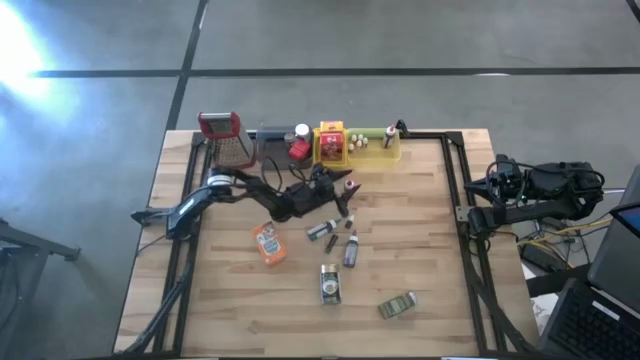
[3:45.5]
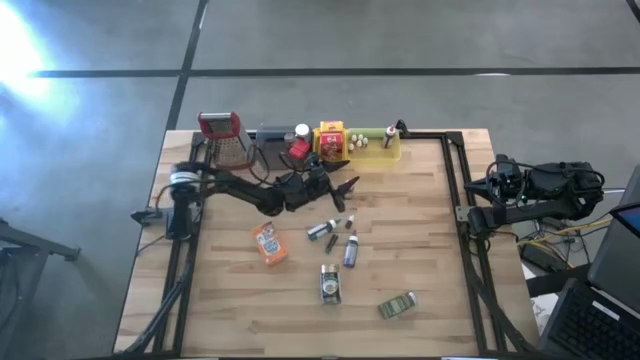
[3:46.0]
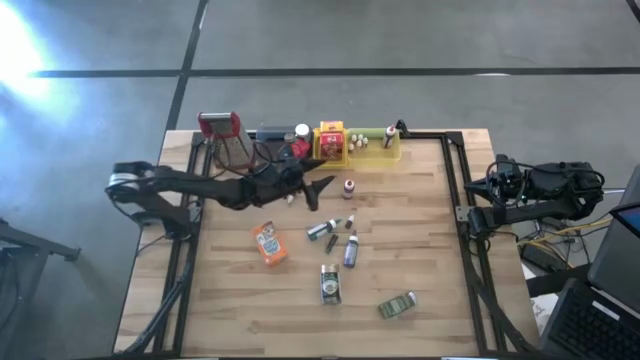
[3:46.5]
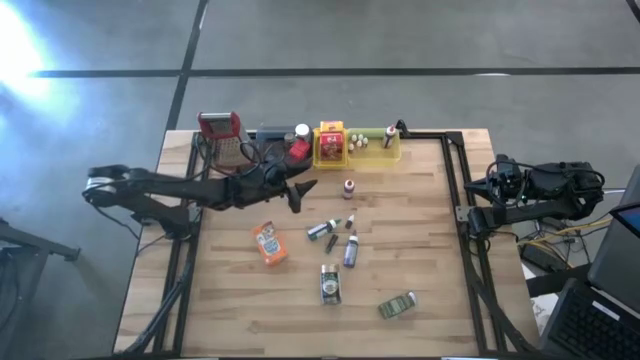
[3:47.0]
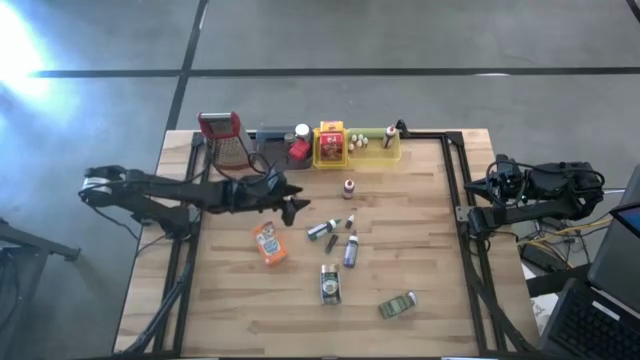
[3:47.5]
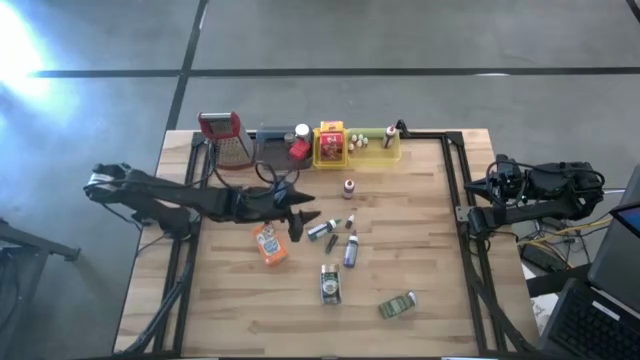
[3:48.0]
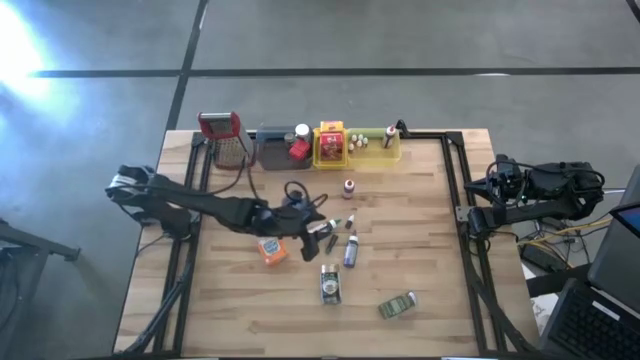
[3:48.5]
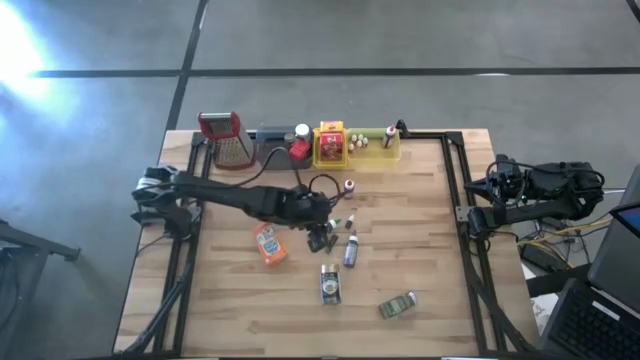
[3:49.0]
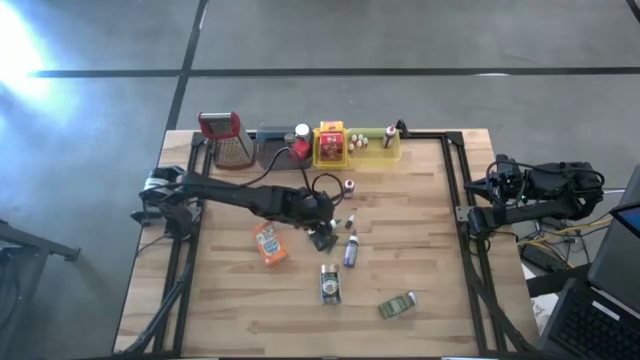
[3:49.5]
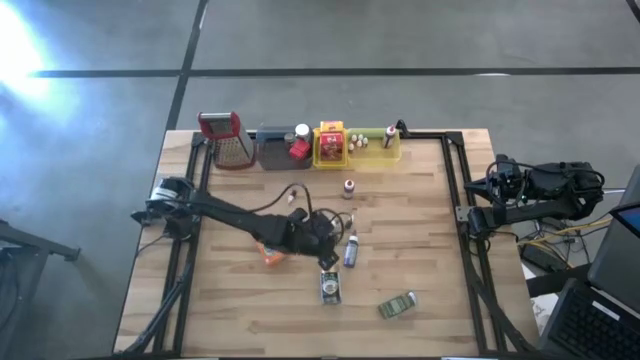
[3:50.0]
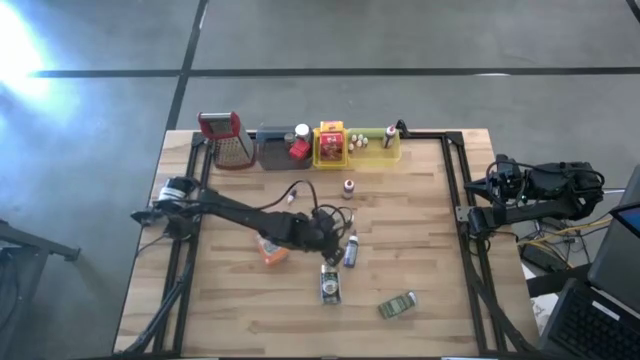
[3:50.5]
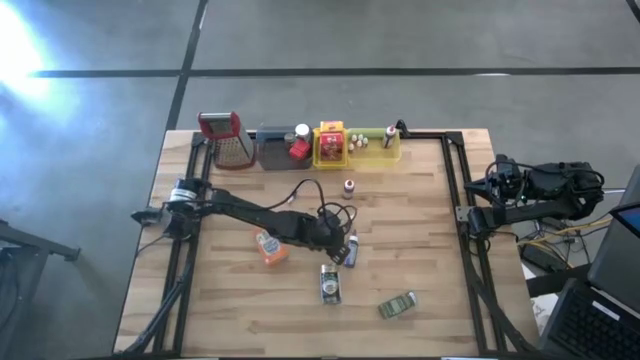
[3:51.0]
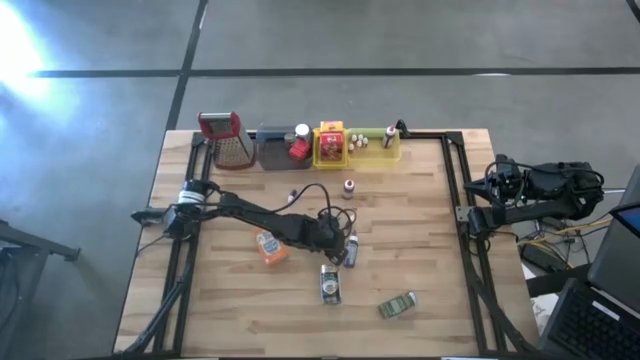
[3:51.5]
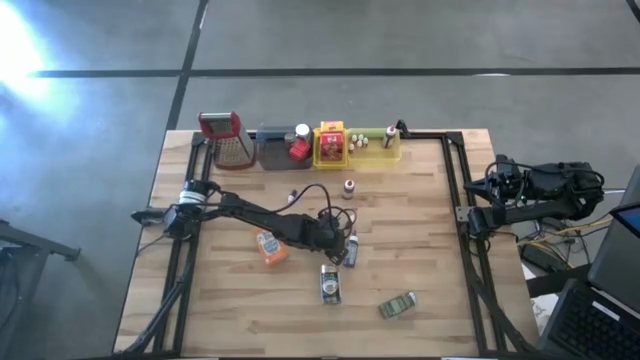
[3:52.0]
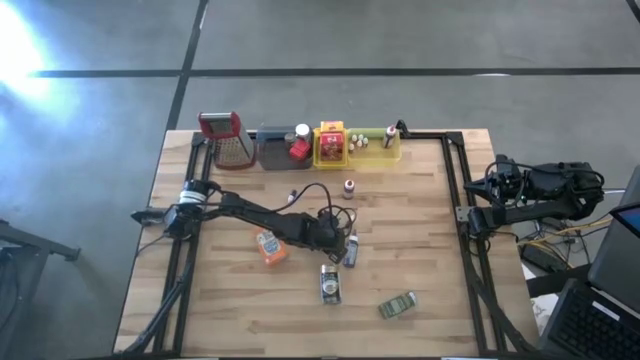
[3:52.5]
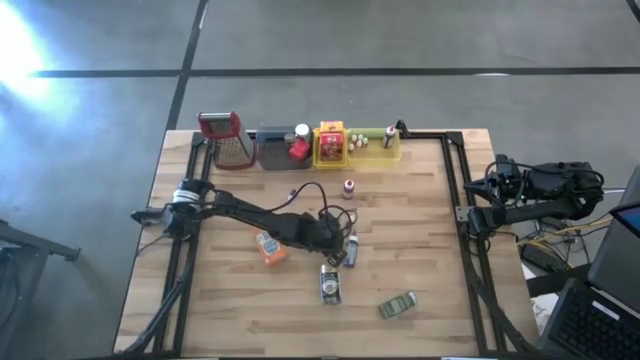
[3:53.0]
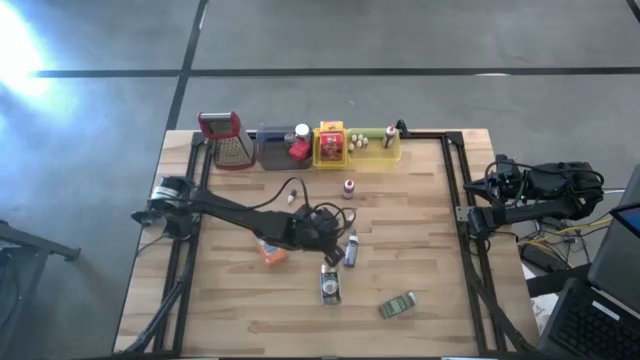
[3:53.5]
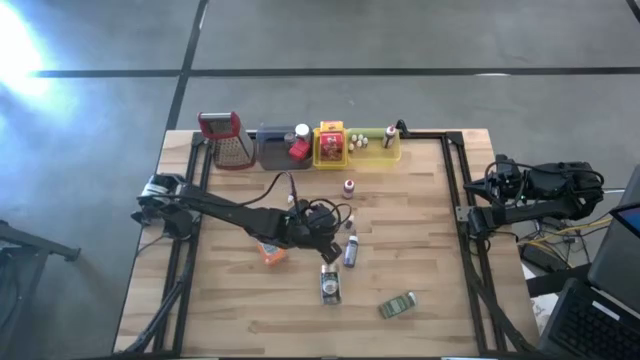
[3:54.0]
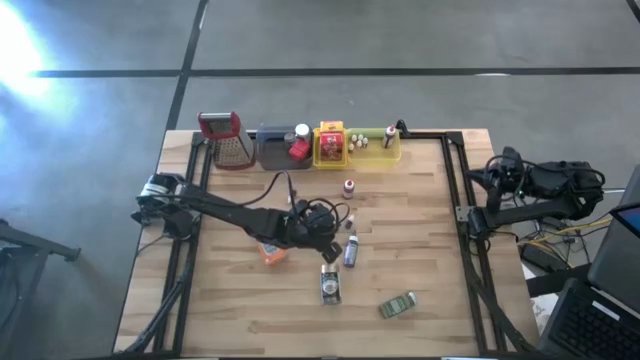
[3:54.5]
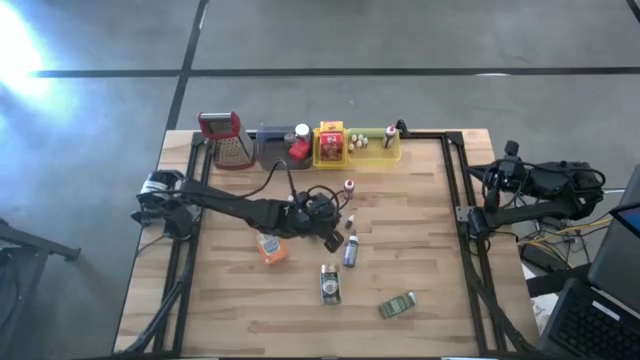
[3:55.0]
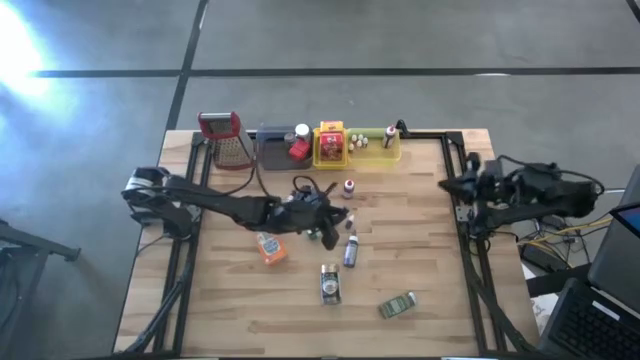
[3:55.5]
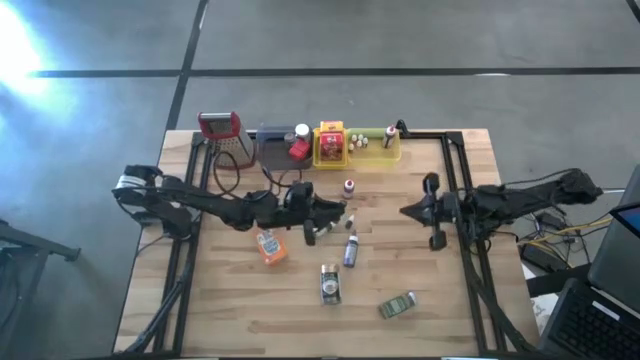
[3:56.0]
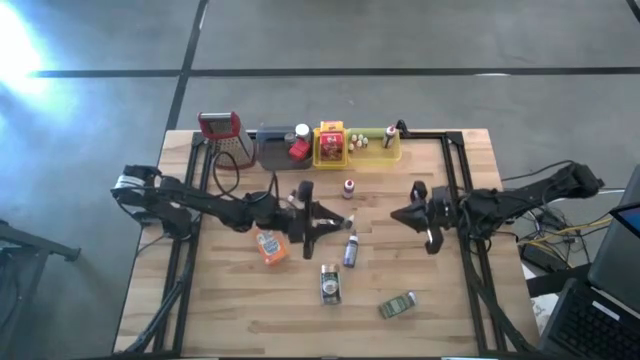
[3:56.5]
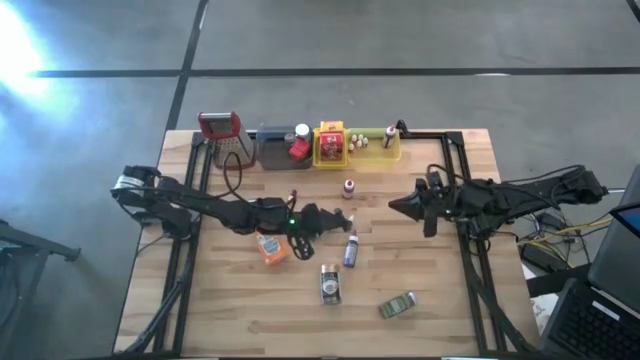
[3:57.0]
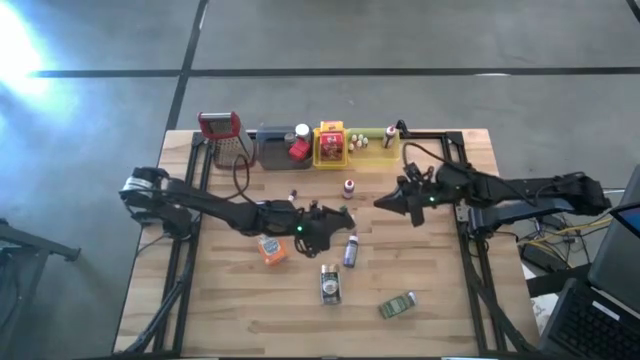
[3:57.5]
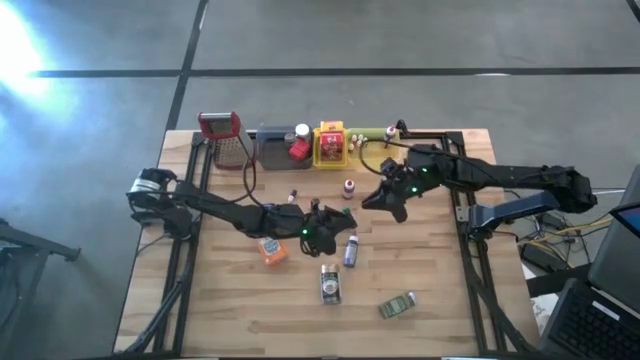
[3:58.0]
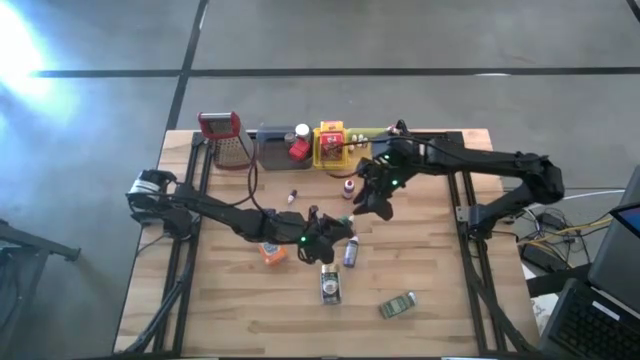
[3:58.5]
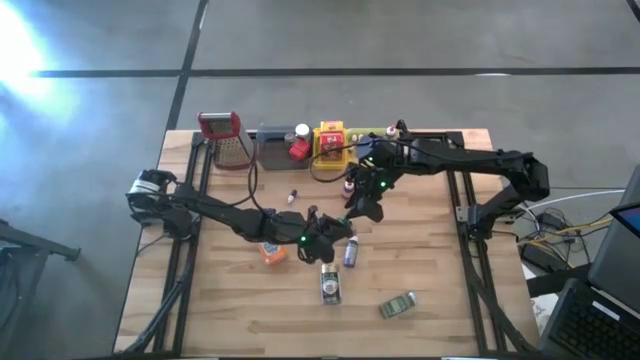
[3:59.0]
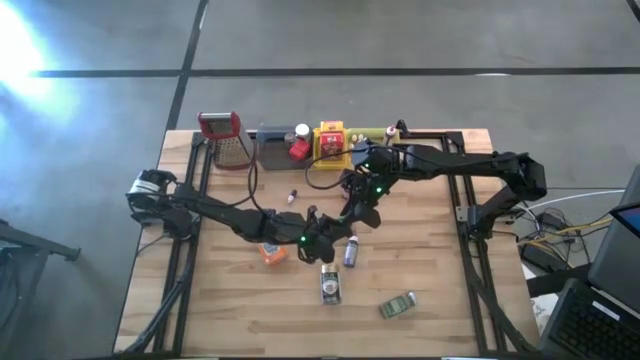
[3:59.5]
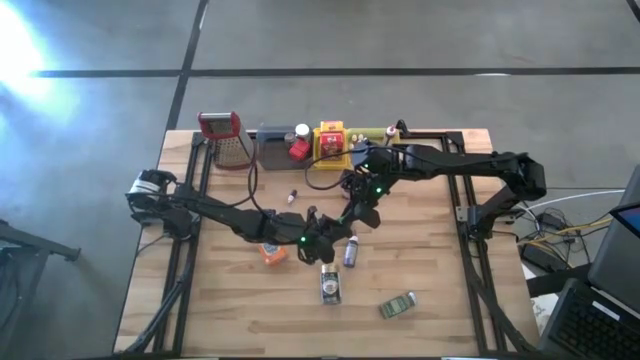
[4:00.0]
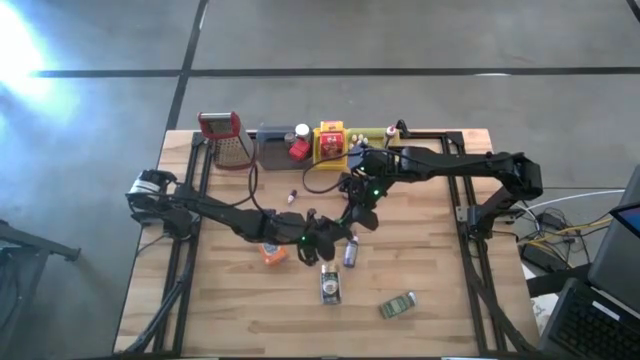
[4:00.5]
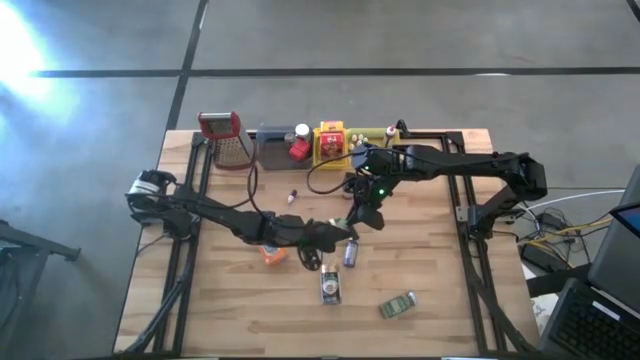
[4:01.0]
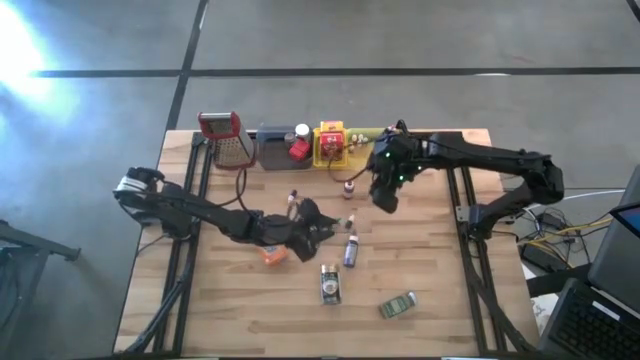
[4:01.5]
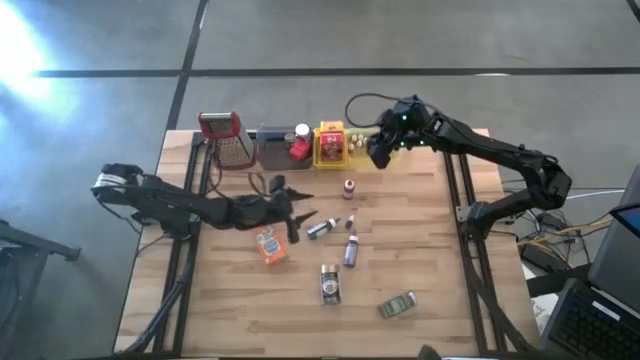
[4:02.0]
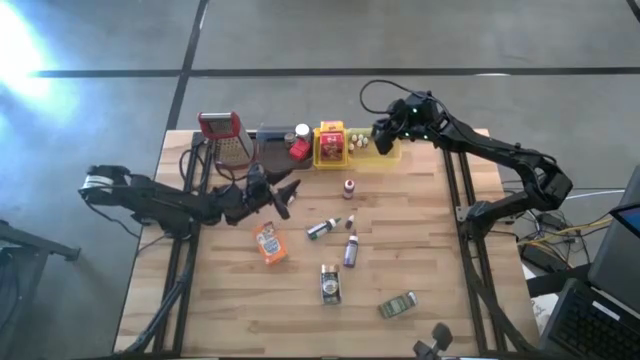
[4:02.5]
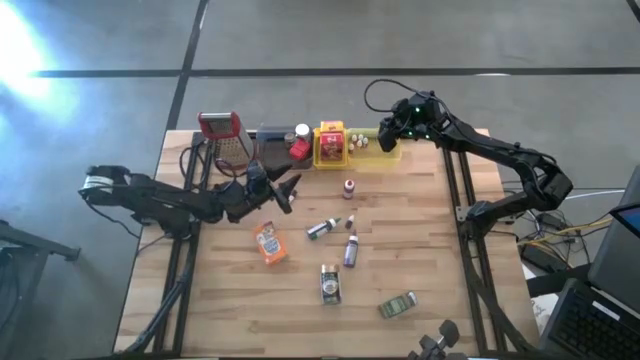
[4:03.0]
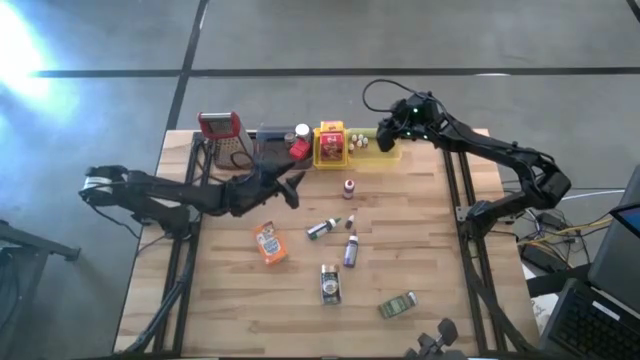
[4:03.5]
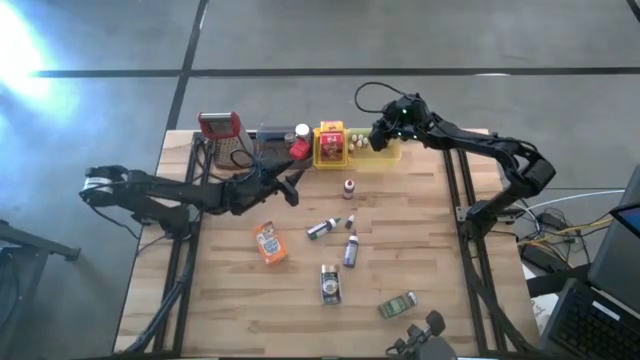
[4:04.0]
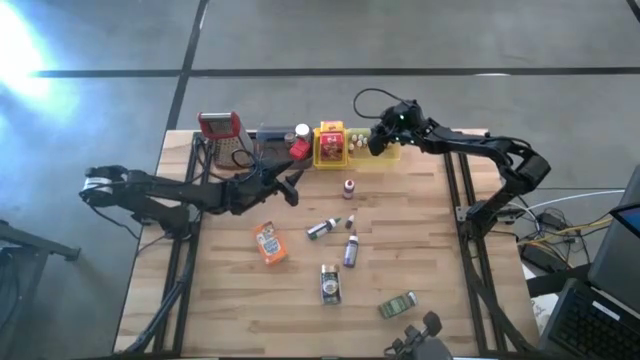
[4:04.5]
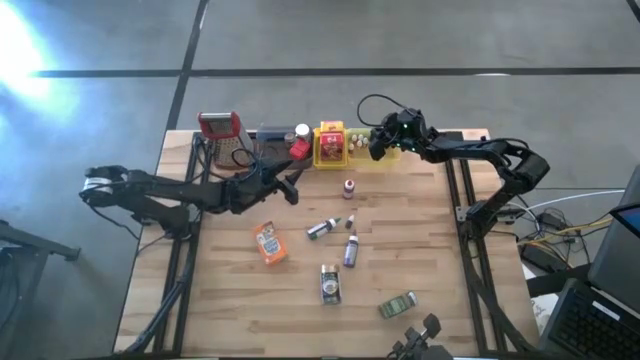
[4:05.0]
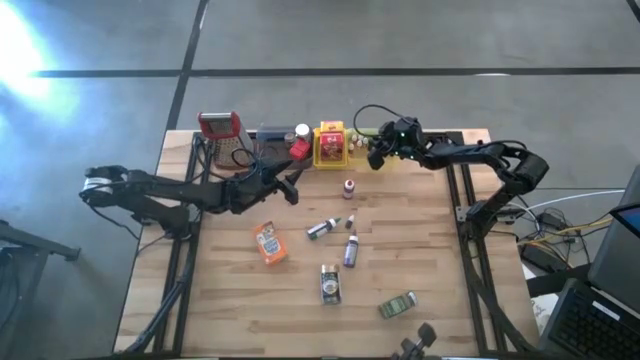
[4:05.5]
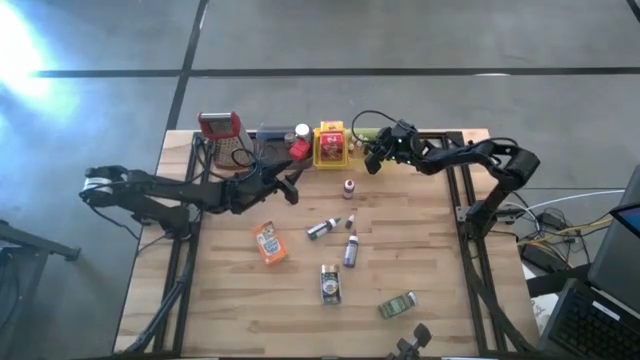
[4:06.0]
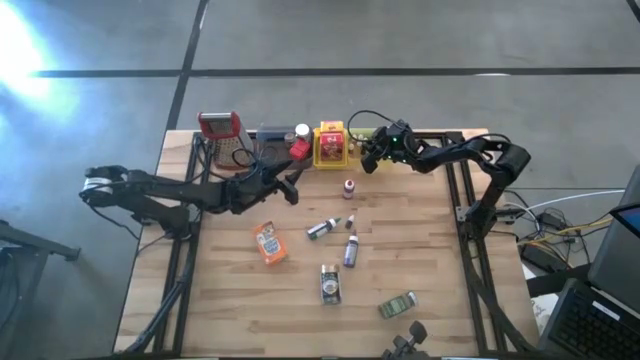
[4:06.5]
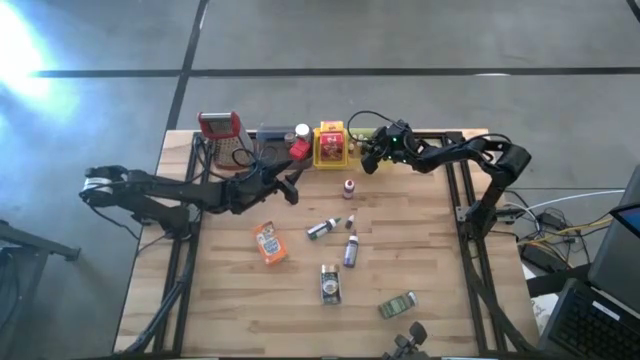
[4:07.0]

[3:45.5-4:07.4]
Task: Pick & Place Kitchen Items
Put the green food coloring bottle into the light yellow bin
